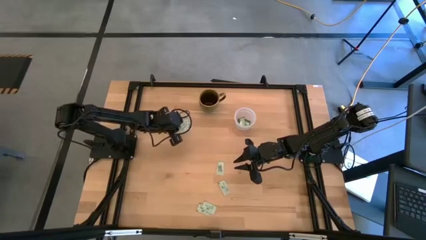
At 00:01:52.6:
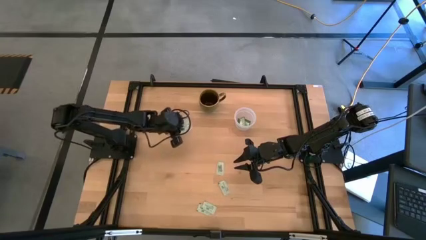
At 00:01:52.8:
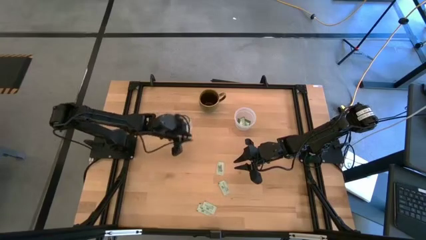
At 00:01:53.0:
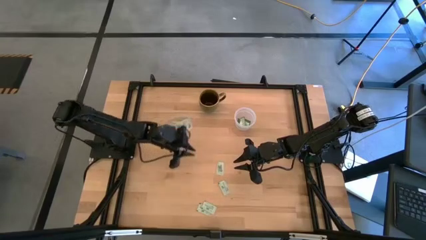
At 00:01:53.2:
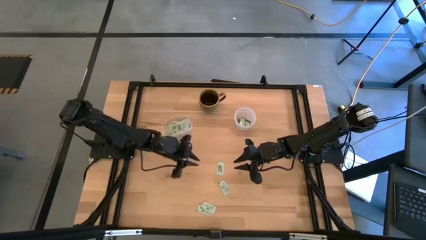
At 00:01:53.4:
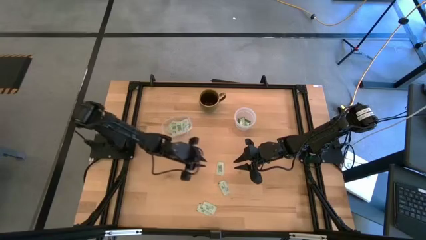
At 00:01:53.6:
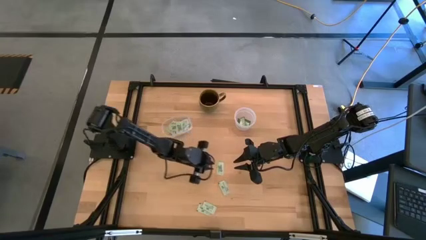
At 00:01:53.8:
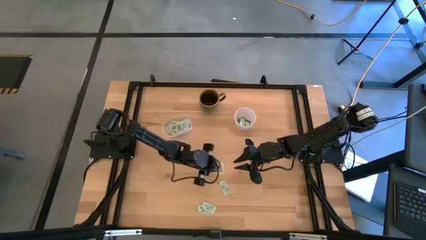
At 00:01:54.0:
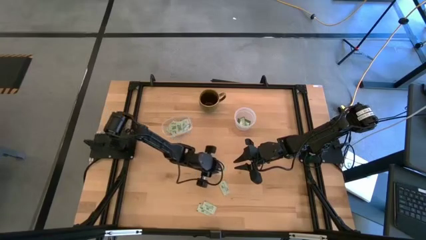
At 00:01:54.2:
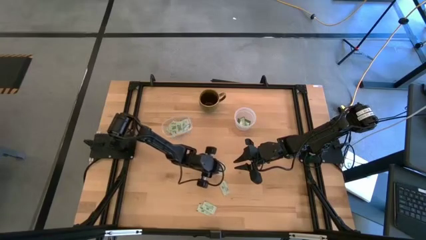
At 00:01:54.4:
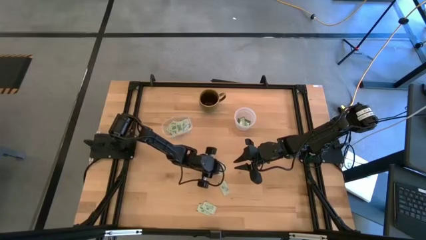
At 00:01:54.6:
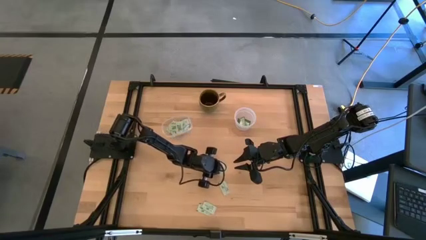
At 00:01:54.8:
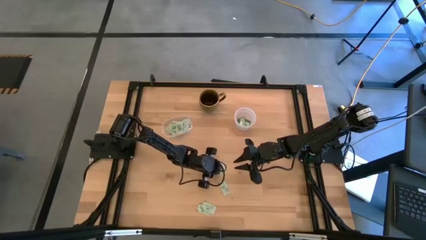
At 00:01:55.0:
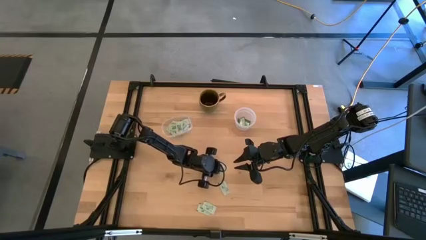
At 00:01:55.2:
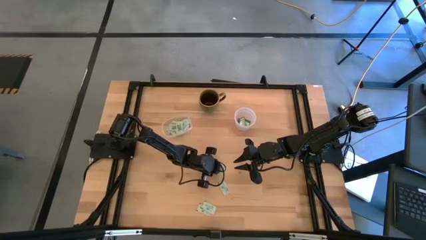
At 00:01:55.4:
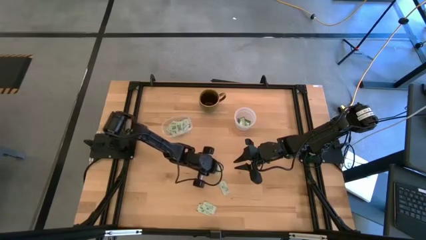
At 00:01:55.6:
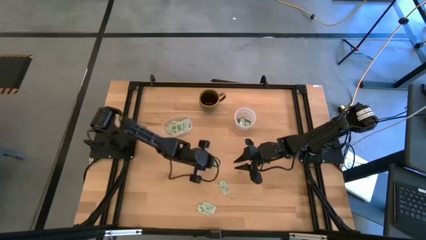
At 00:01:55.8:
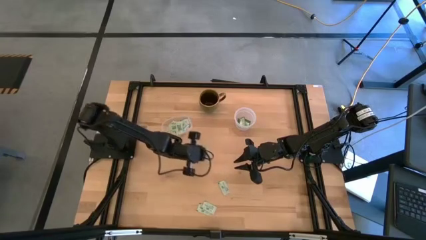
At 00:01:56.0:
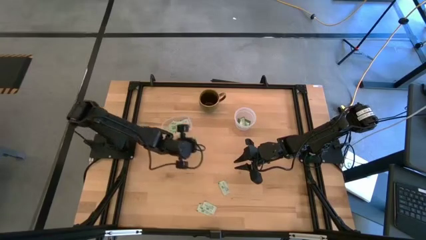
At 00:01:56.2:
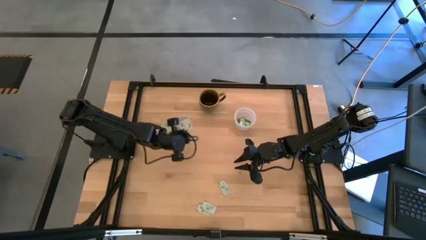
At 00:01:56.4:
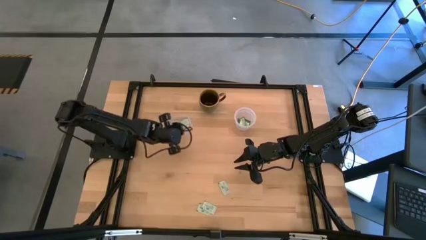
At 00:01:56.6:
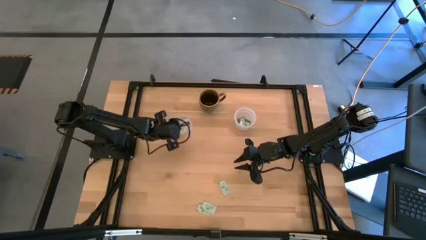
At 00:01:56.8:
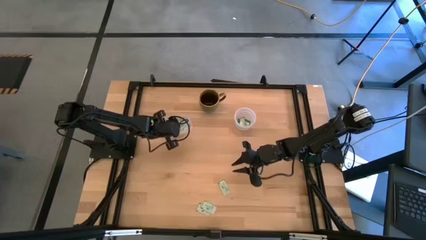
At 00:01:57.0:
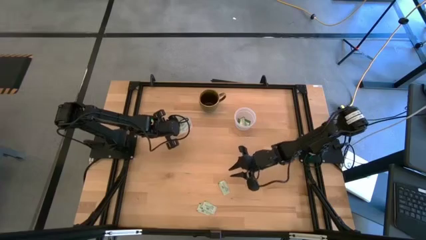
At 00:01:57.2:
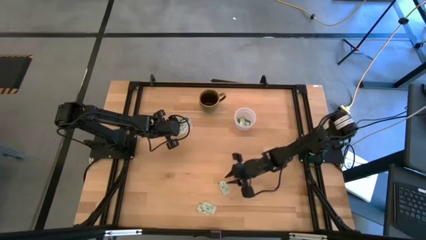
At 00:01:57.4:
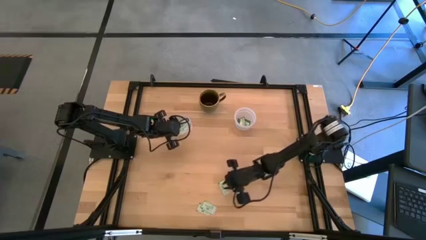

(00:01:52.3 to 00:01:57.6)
Task: Pick and place Stevia / Truvia into bins
Put the light green stevia packet into the left transparent container

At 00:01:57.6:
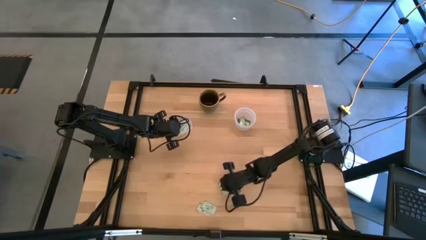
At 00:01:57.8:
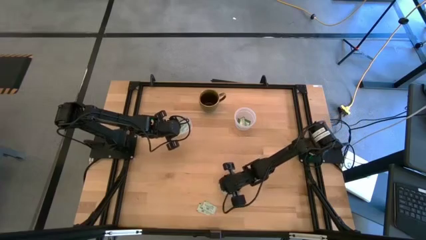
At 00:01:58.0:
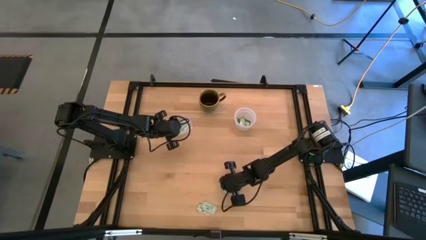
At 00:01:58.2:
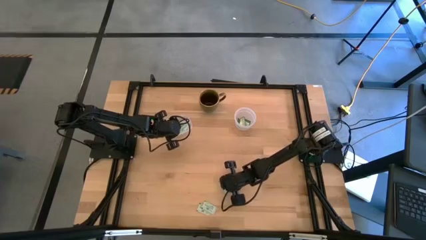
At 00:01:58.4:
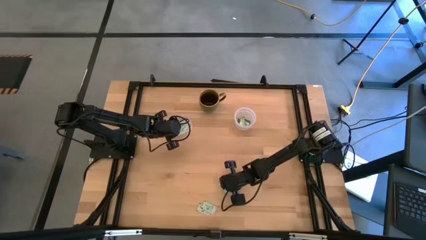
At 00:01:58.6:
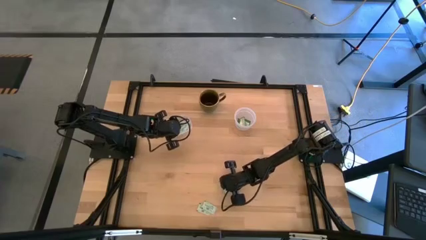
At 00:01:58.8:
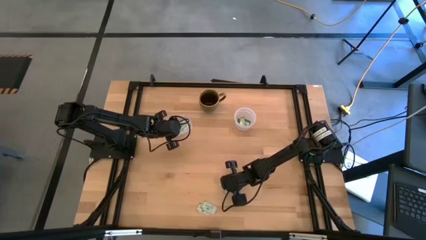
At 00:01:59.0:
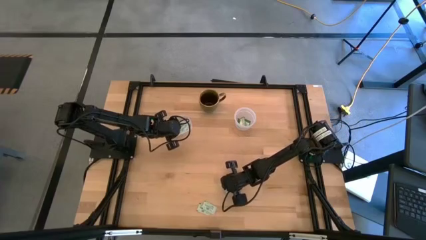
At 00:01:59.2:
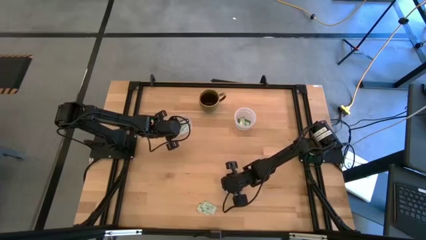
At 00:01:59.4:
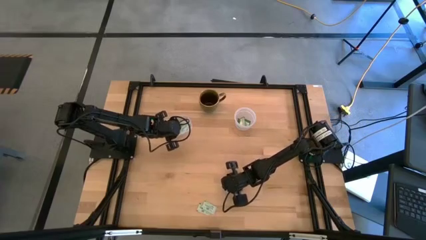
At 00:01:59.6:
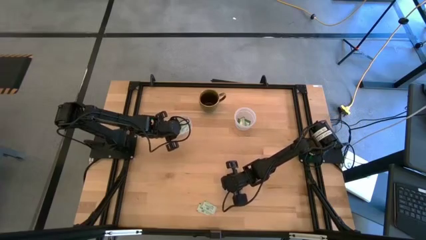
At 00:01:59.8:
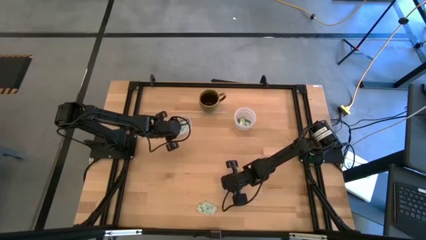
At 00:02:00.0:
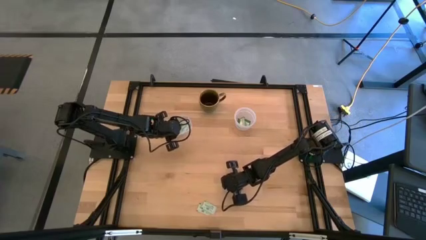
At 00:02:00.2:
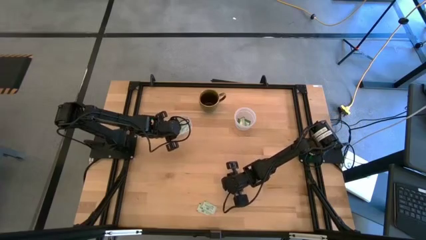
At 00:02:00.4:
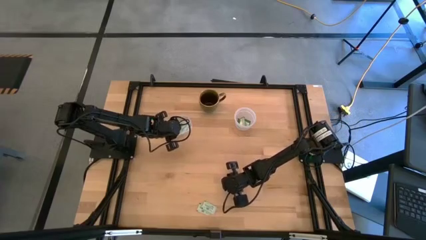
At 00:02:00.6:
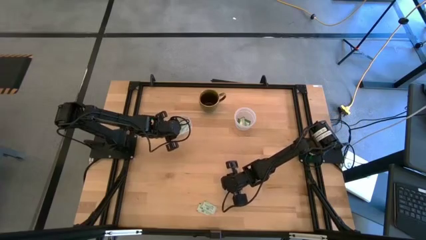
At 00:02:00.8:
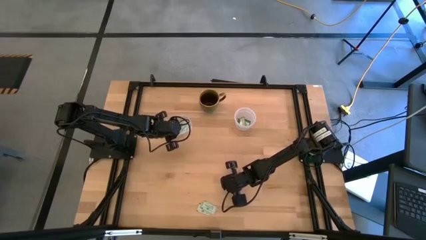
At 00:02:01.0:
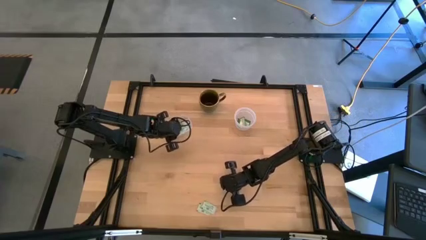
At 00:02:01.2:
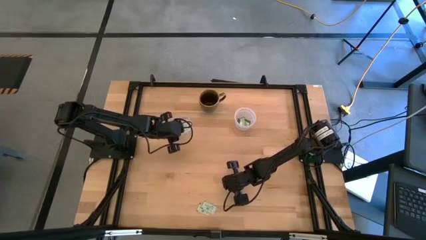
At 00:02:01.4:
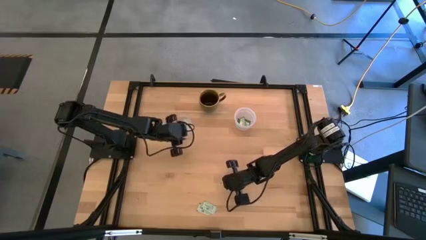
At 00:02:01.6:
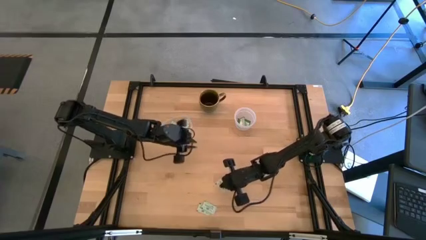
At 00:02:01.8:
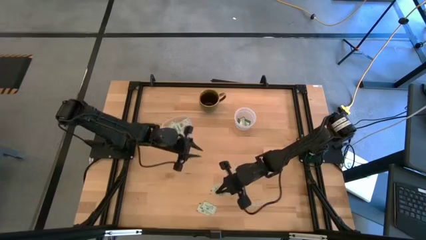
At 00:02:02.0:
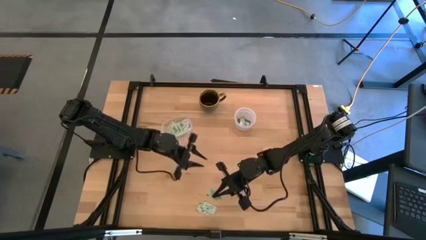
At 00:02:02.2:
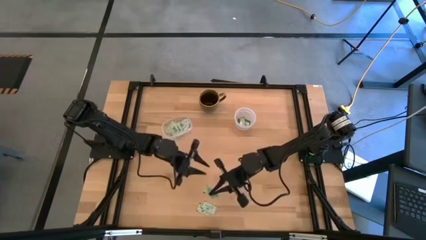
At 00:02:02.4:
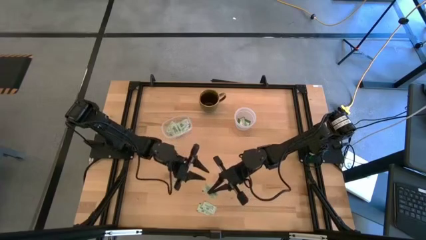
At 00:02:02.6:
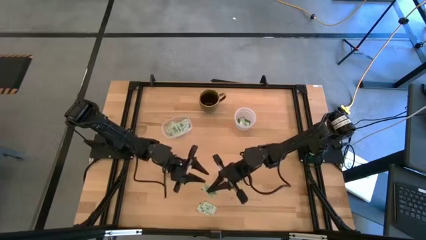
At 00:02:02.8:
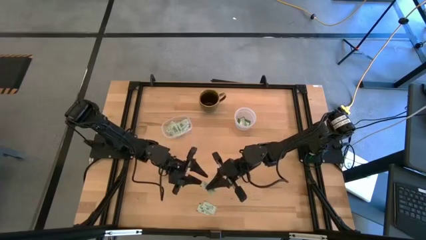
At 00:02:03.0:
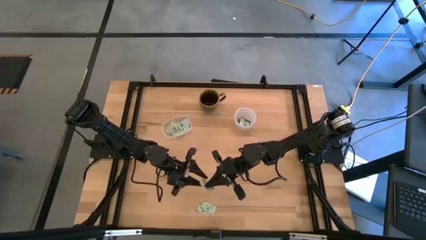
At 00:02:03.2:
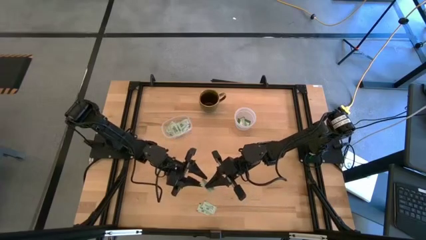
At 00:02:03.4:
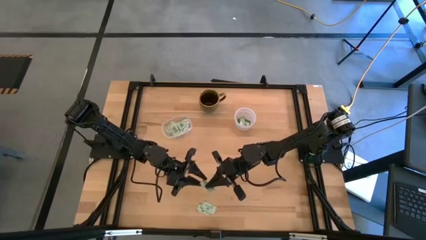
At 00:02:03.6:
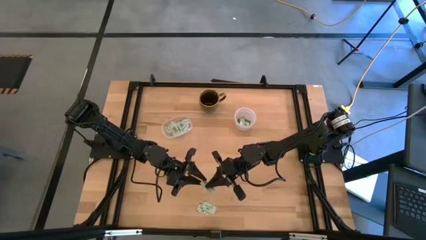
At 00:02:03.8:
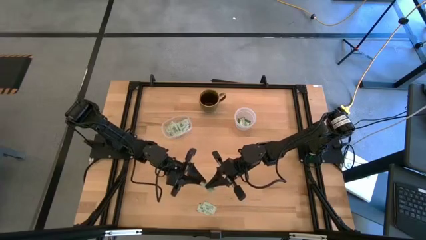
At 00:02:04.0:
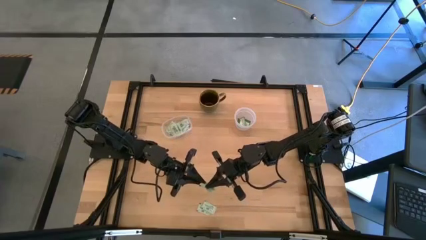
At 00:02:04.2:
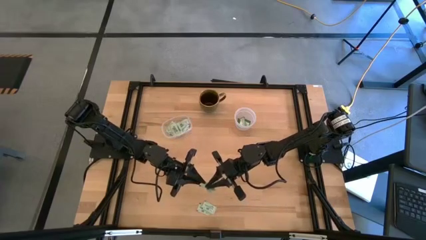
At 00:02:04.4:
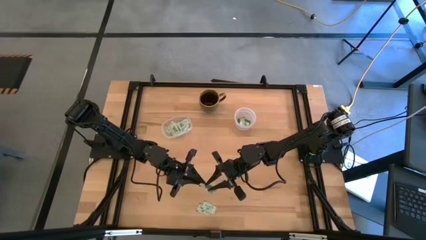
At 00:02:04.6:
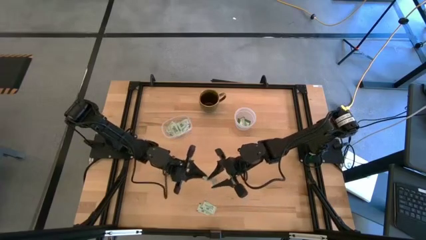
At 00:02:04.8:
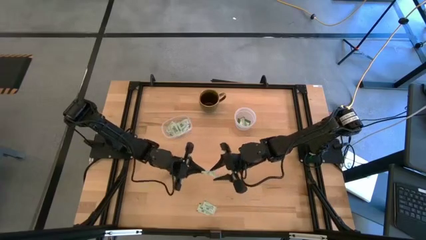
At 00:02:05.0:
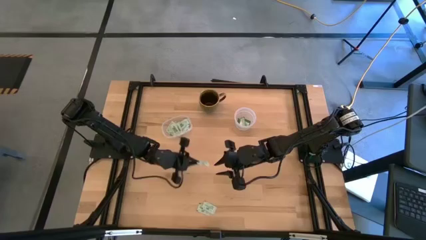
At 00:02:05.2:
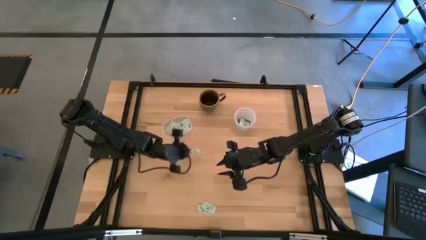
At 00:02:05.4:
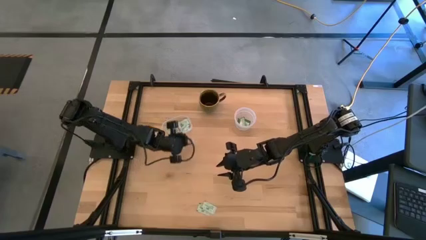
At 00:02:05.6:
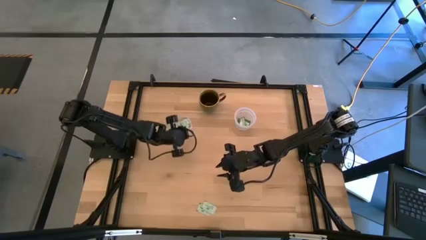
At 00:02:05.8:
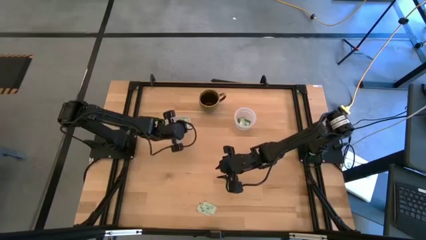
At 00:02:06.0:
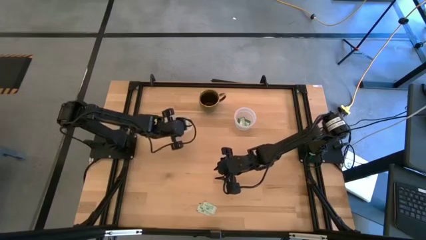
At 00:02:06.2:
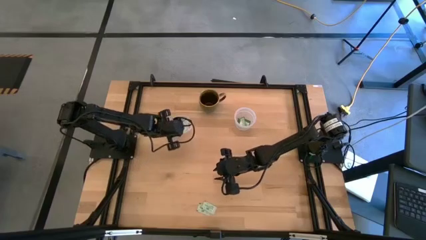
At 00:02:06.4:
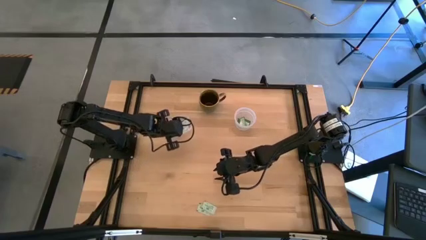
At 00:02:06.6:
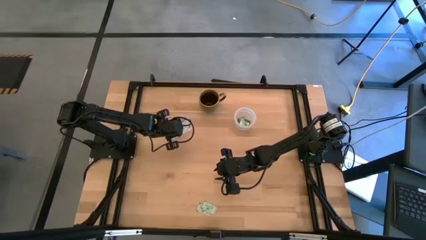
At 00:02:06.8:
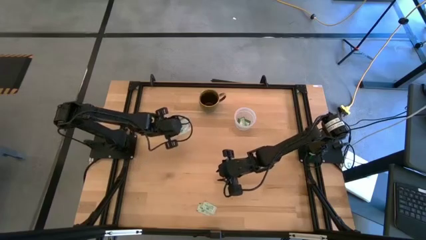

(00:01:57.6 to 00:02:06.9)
Put the light green stevia packet into the left transparent container
